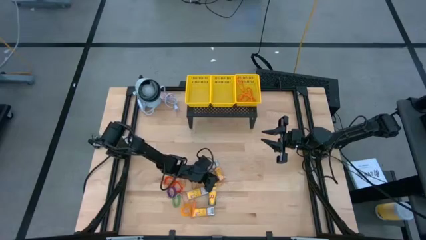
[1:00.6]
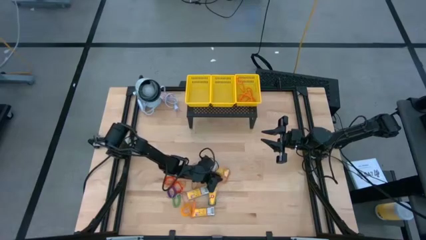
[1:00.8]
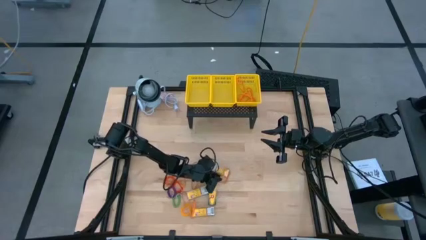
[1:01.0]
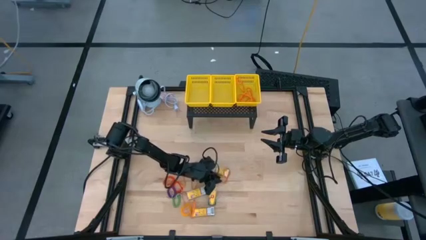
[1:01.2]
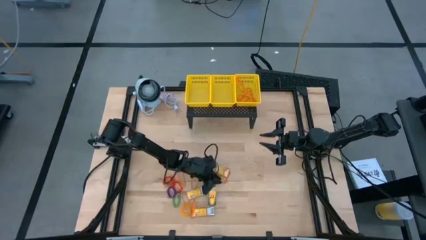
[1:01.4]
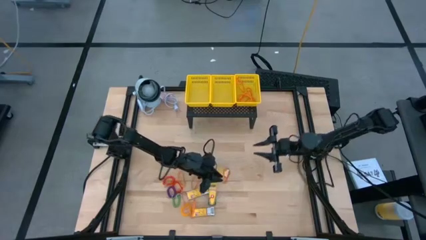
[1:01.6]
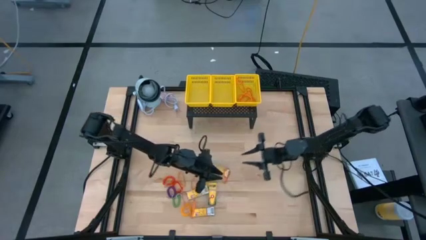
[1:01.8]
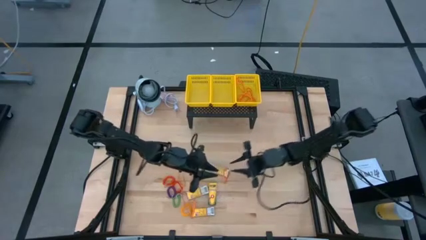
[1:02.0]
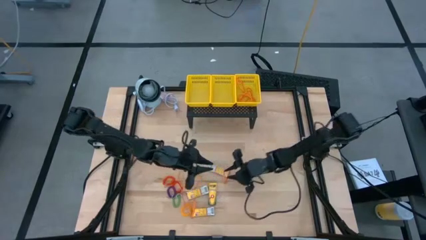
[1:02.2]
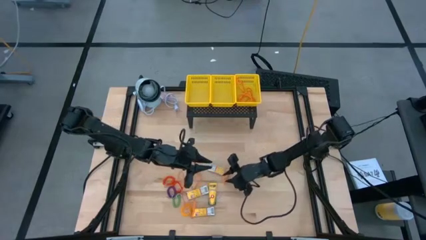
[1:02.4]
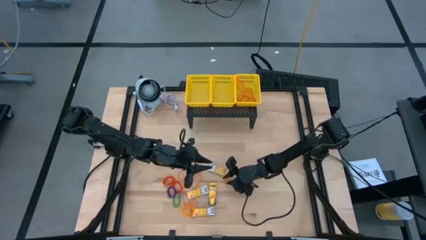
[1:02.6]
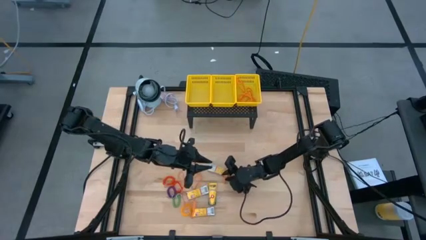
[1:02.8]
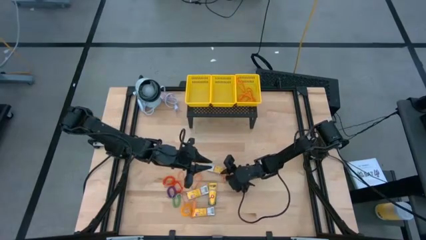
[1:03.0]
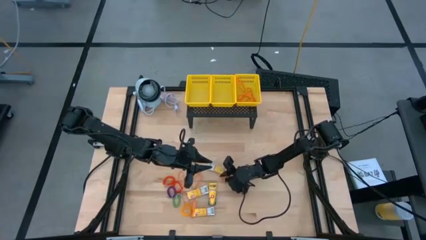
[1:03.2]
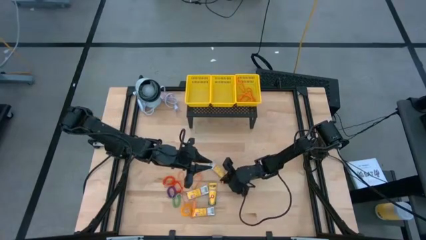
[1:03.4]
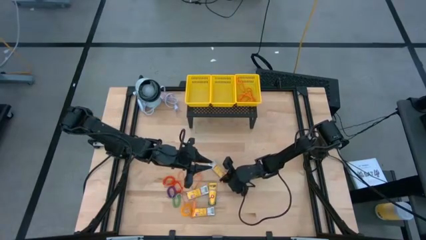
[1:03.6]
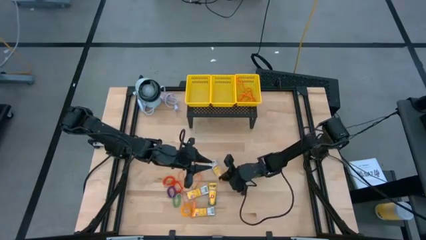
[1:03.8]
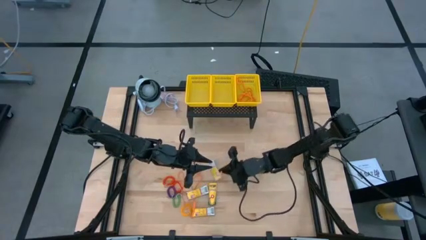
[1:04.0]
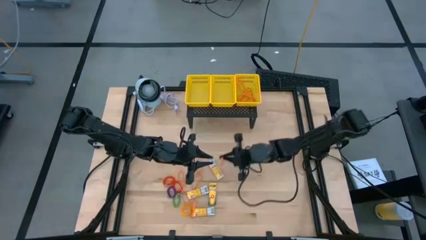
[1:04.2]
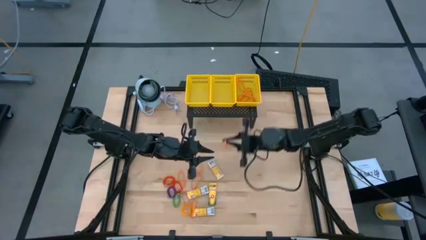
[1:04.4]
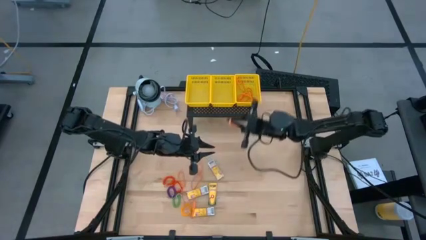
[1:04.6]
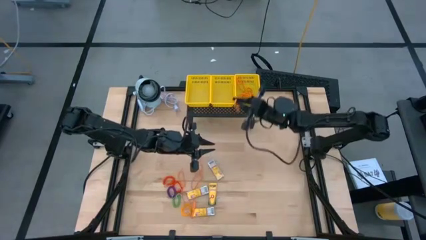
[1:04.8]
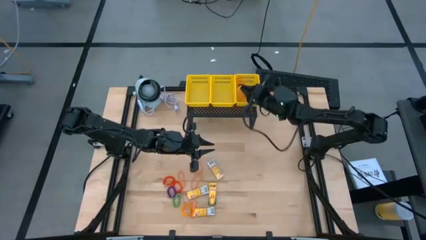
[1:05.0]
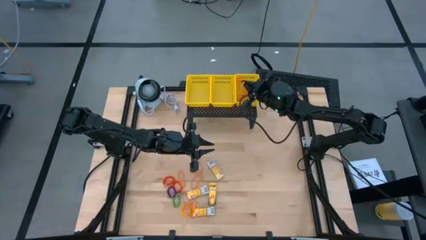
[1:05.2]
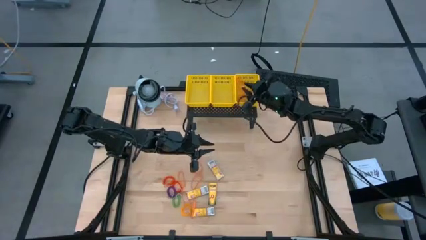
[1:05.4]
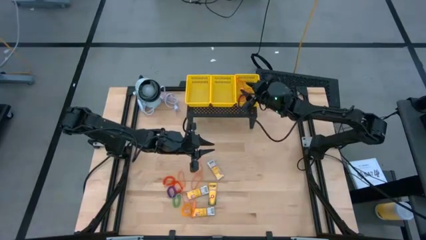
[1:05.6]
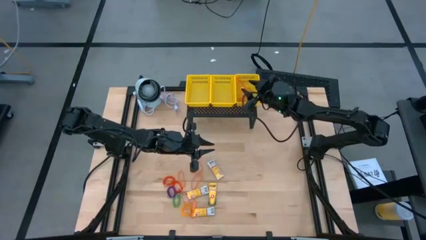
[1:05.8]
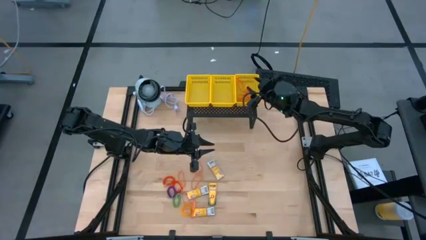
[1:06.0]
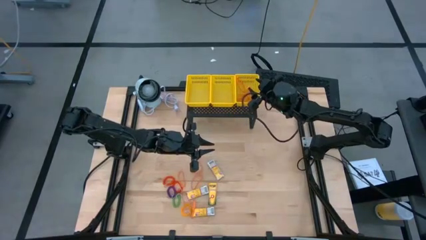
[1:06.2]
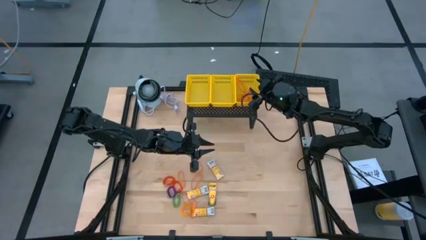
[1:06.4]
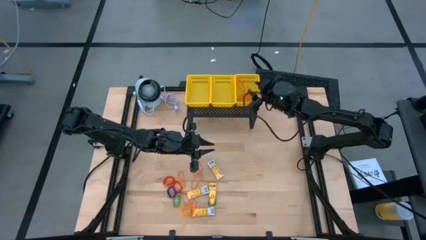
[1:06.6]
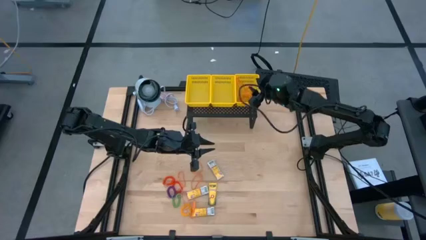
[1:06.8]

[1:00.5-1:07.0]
Task: Pick & Place Office Desk Supplies
Put the orange rubber band into the right yellow bin on the shelf

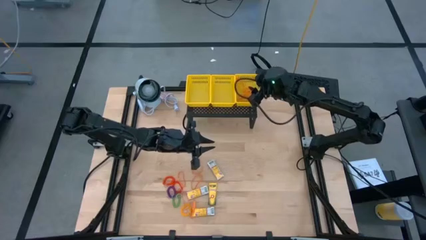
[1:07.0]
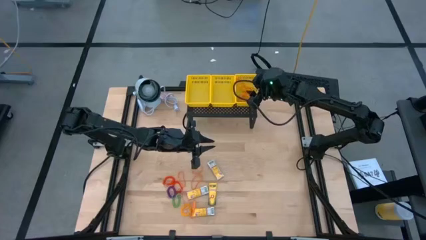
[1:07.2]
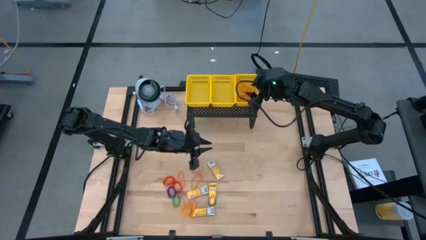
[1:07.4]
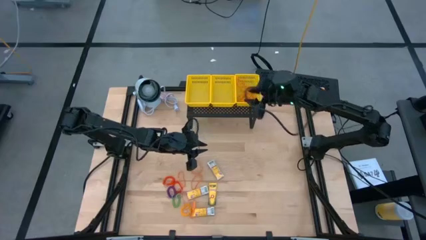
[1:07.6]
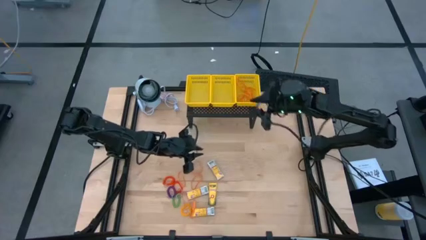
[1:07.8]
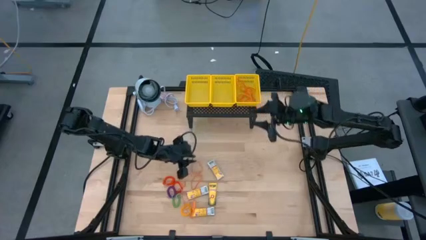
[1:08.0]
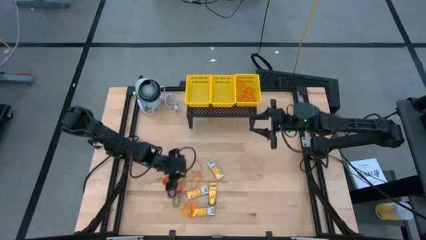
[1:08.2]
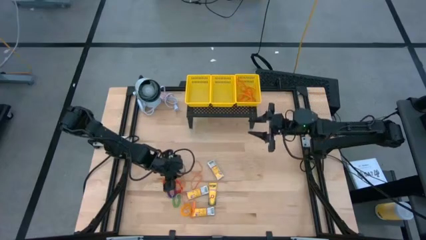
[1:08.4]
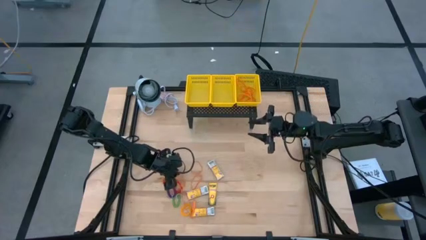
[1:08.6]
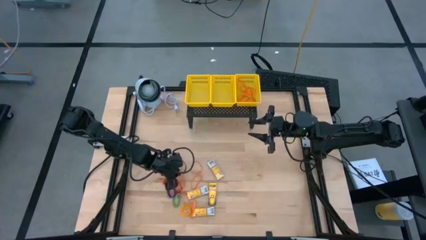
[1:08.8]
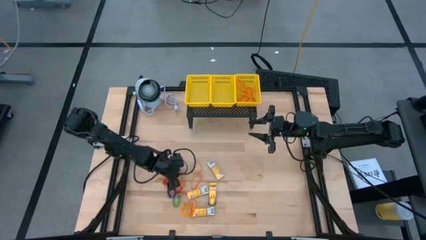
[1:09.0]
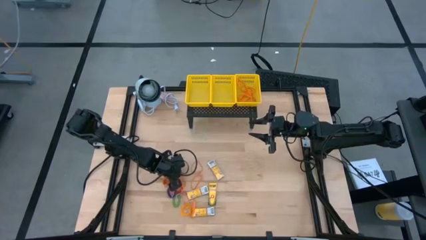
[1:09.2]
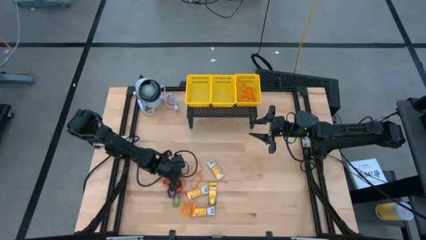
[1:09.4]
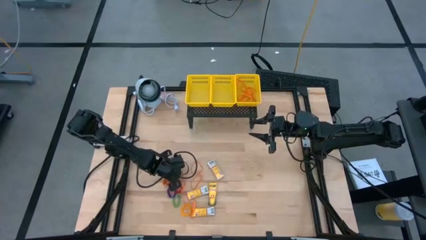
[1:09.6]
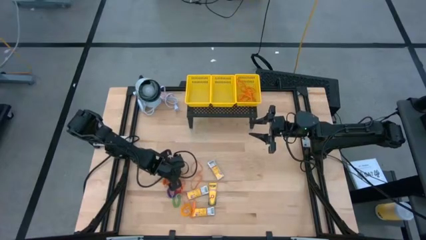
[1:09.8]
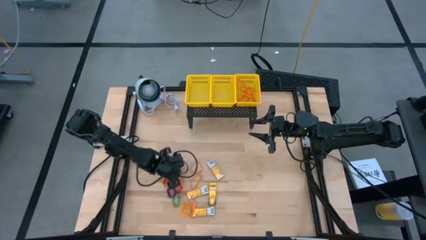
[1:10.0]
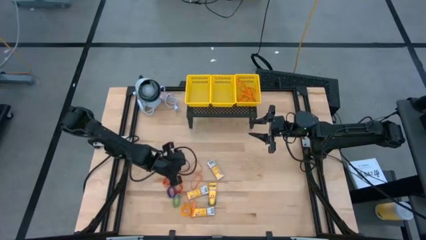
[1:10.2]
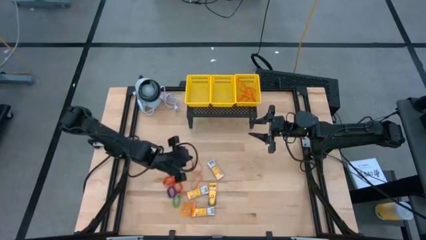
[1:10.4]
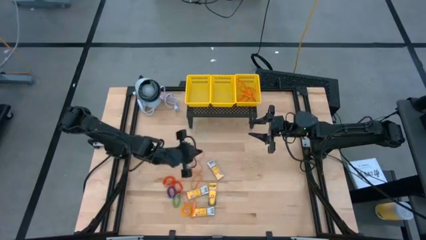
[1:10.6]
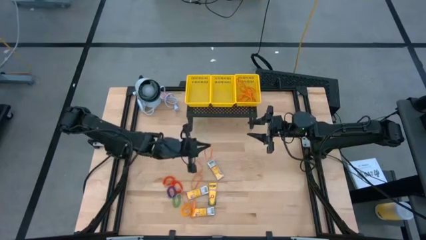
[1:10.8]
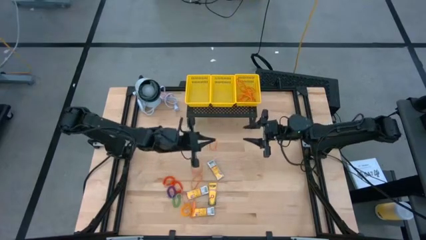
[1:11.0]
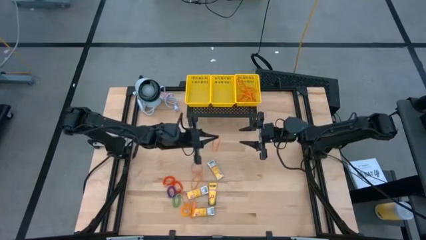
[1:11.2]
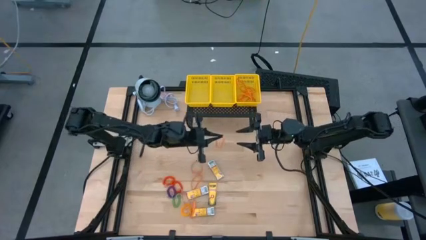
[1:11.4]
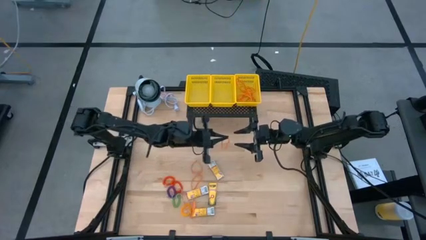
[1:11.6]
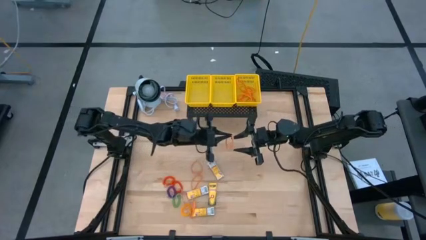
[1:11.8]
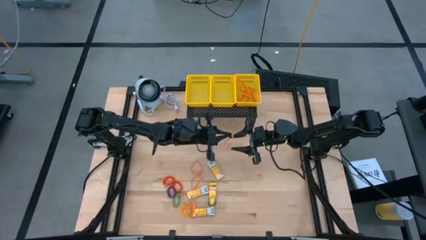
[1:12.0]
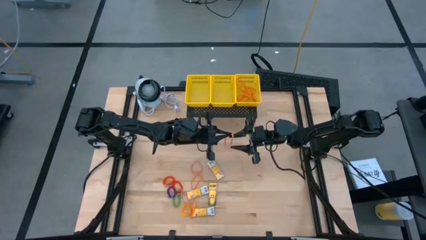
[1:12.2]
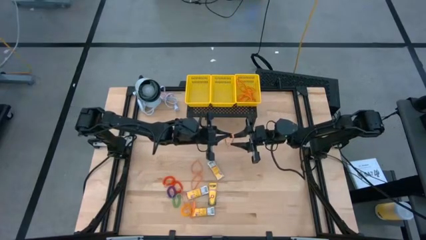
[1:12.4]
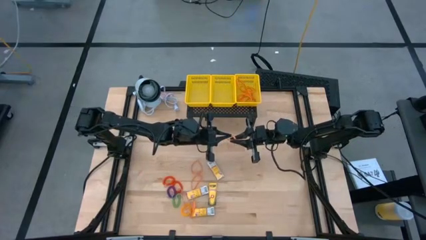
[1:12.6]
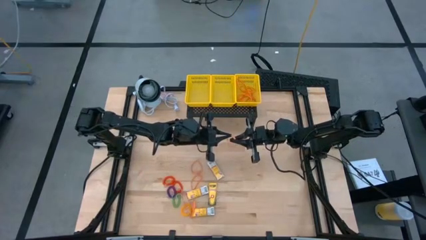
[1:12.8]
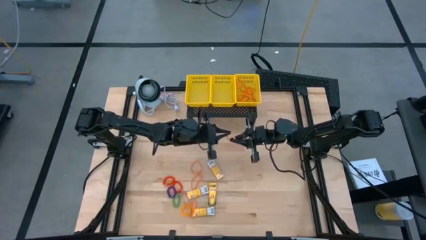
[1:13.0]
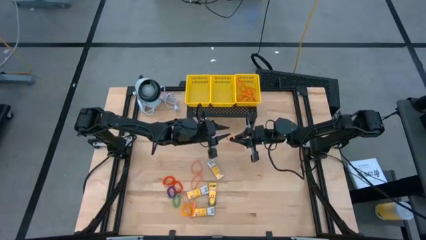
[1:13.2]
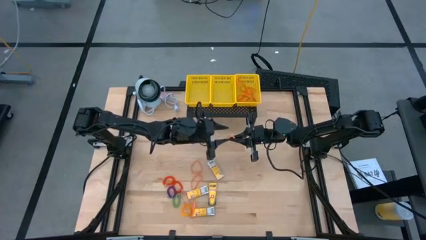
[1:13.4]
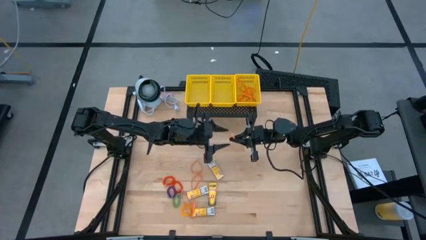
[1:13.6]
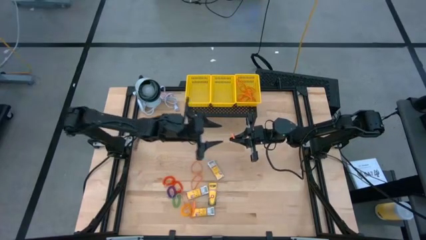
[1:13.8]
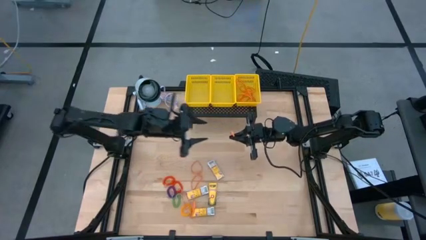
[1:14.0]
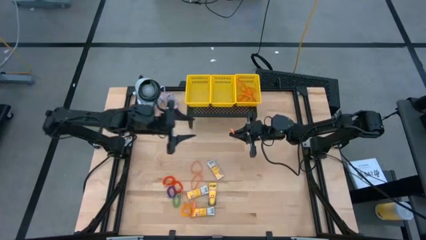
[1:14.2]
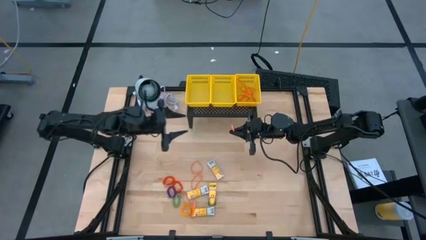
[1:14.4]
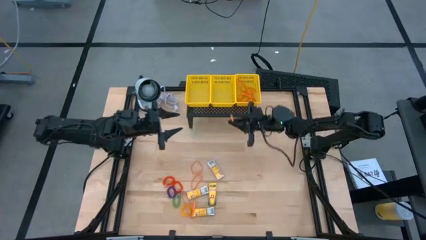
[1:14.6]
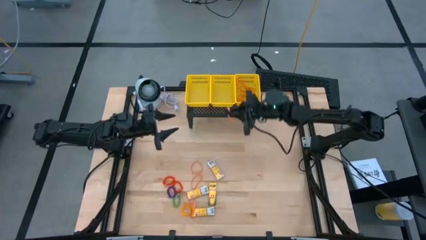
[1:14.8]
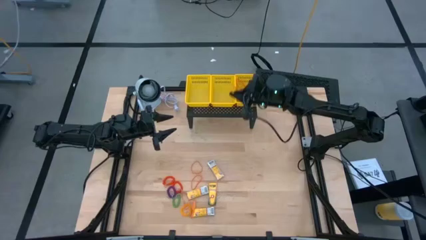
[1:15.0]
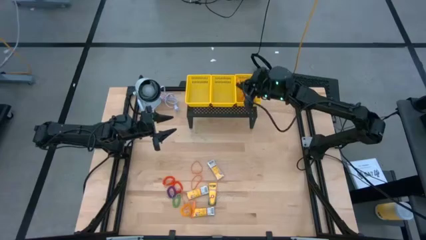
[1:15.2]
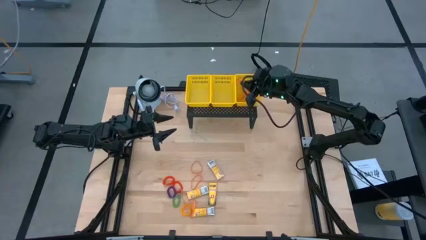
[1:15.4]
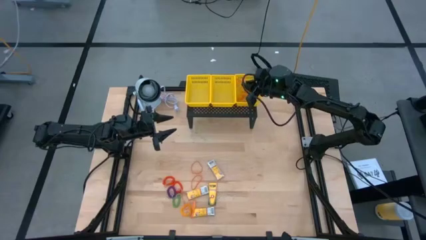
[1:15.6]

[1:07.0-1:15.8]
Put the orange rubber band into the right yellow bin on the shelf
